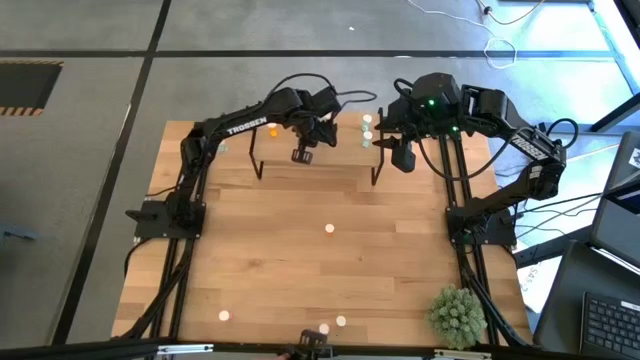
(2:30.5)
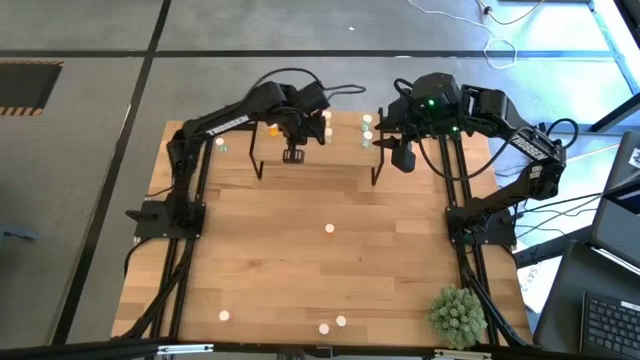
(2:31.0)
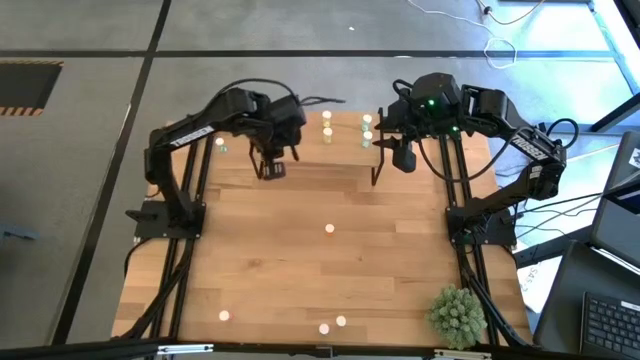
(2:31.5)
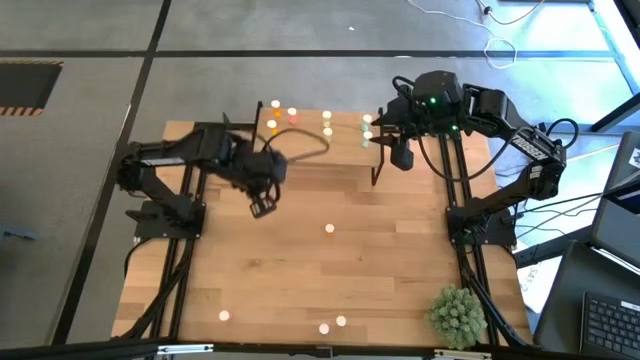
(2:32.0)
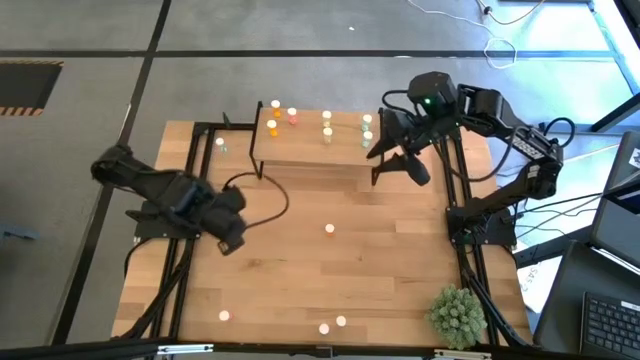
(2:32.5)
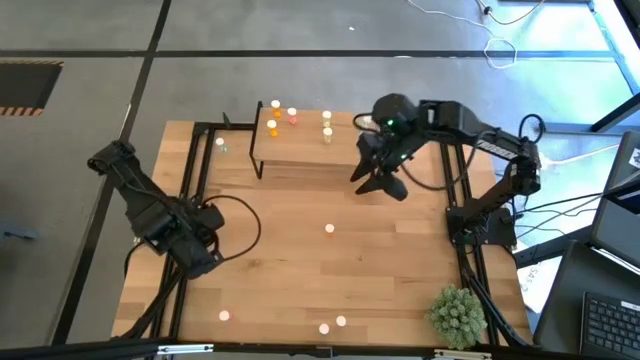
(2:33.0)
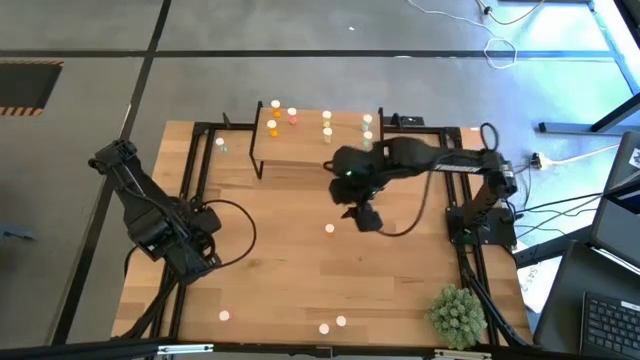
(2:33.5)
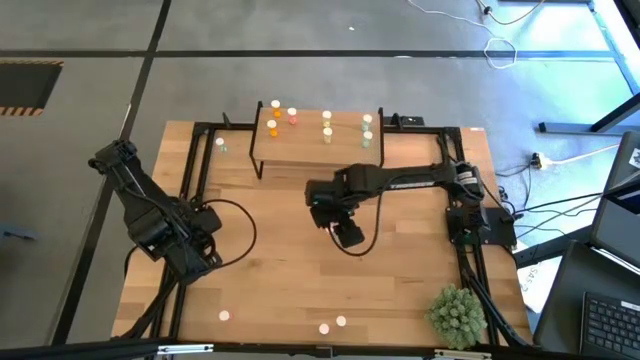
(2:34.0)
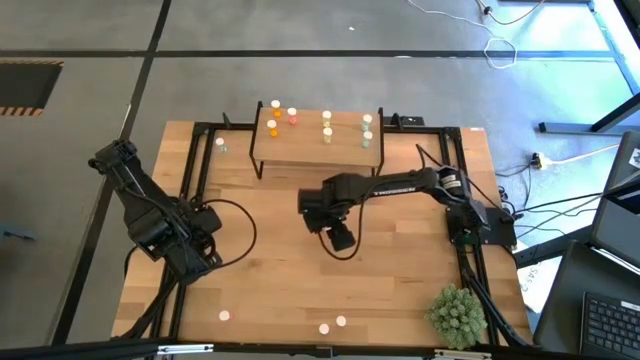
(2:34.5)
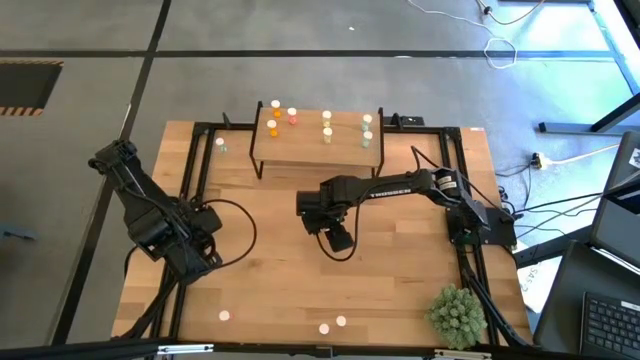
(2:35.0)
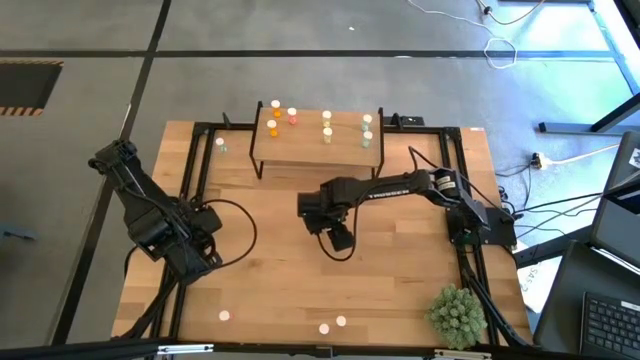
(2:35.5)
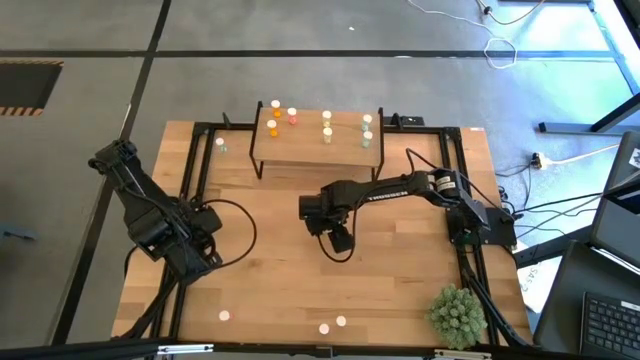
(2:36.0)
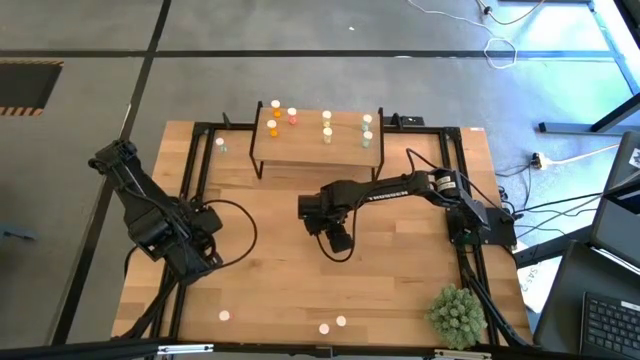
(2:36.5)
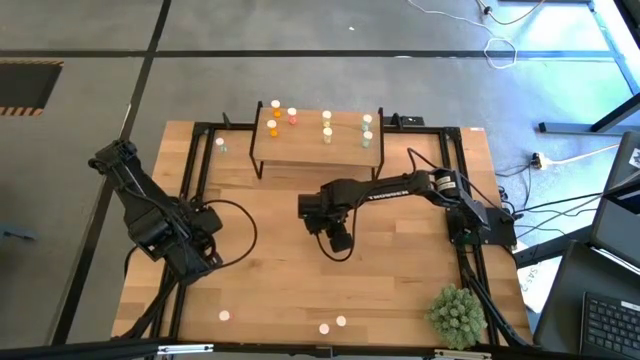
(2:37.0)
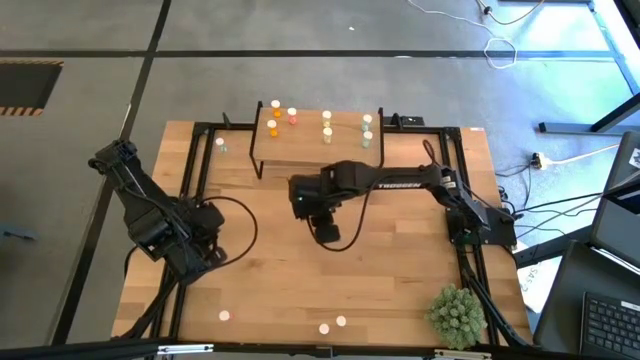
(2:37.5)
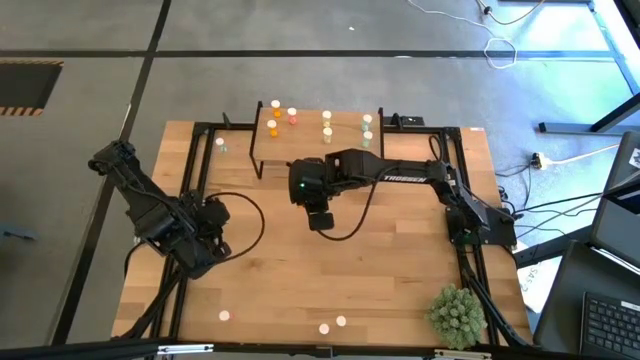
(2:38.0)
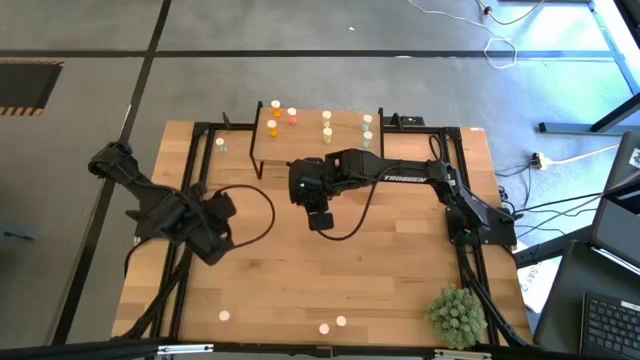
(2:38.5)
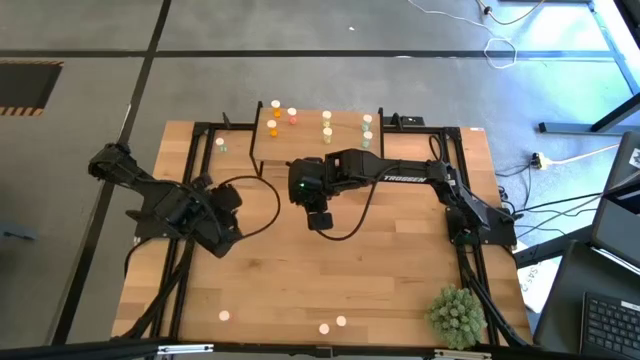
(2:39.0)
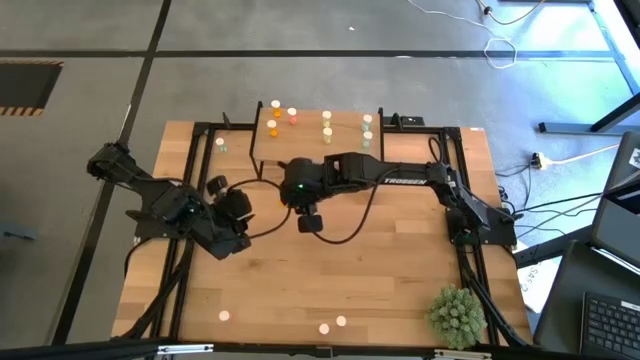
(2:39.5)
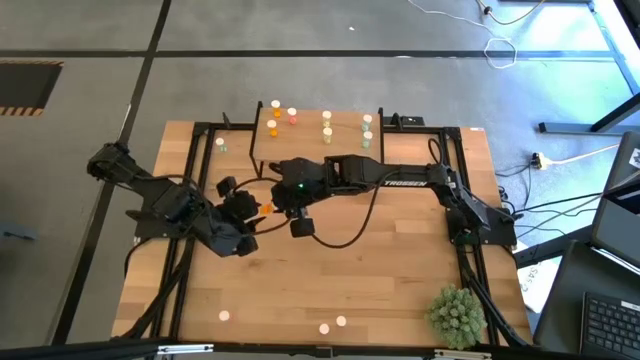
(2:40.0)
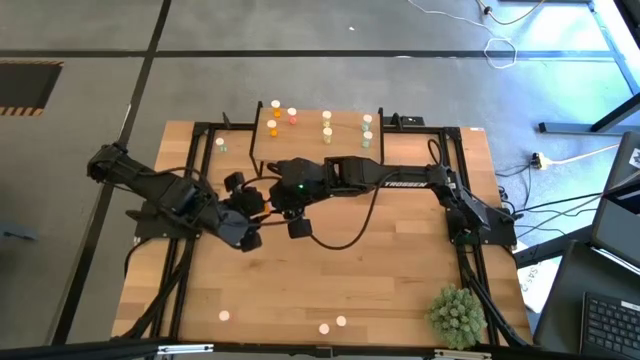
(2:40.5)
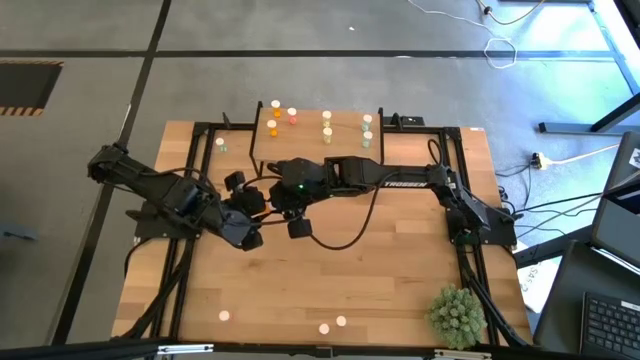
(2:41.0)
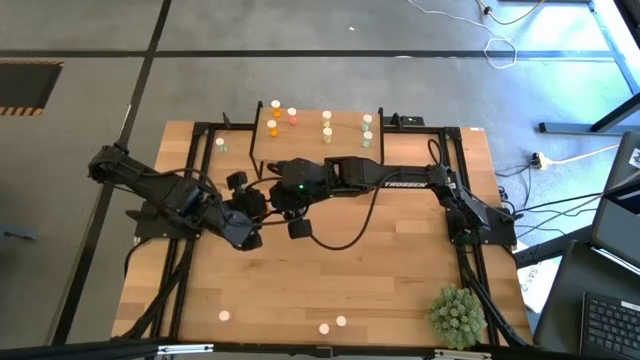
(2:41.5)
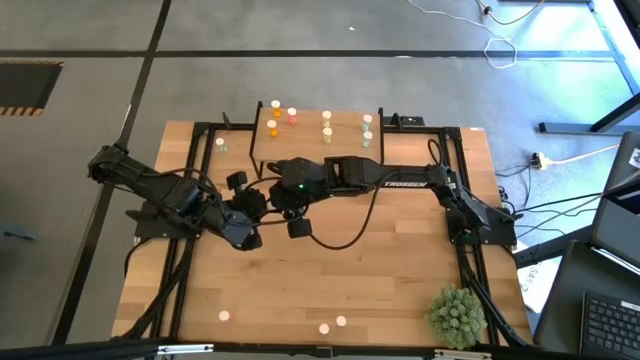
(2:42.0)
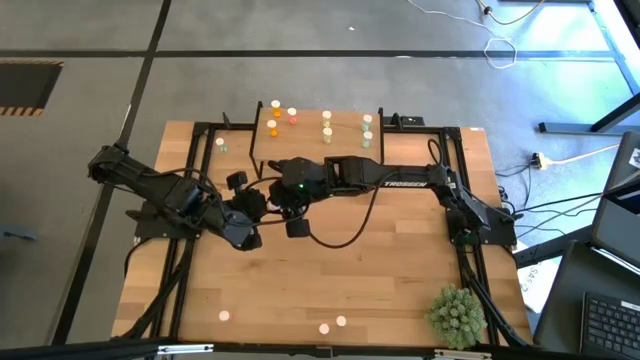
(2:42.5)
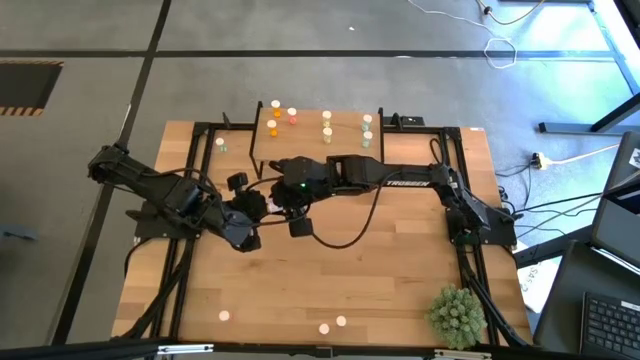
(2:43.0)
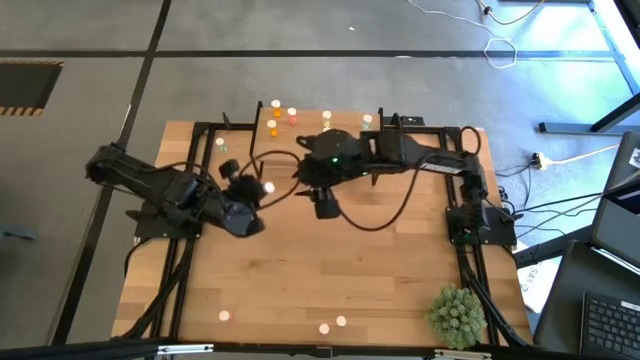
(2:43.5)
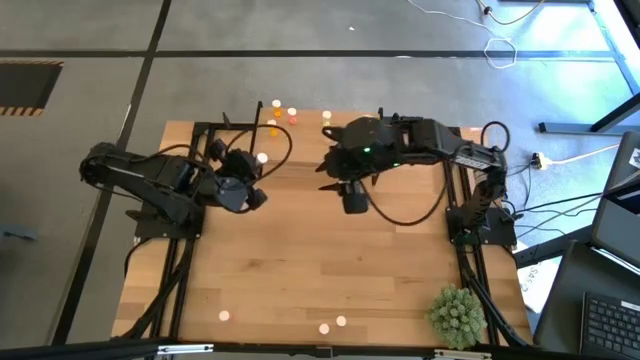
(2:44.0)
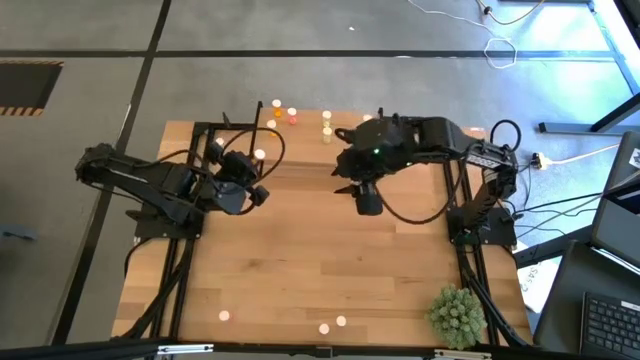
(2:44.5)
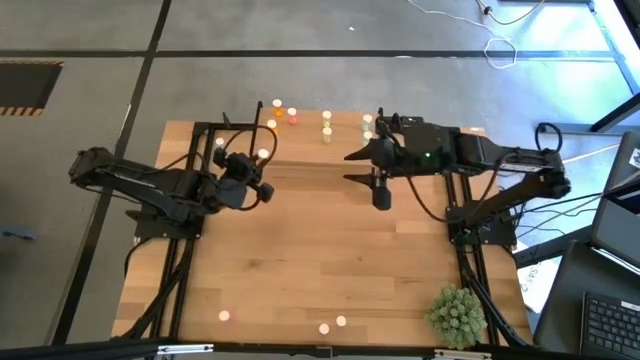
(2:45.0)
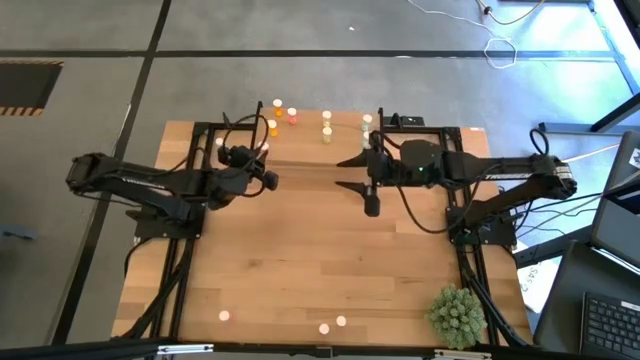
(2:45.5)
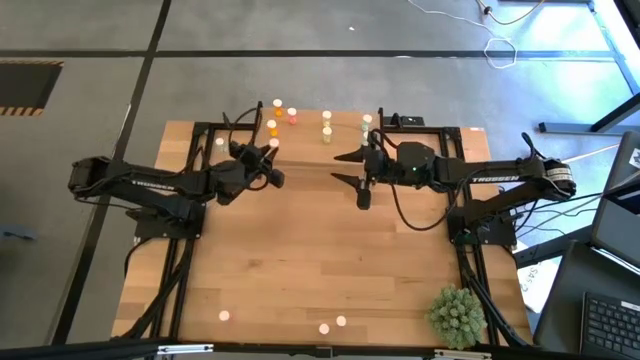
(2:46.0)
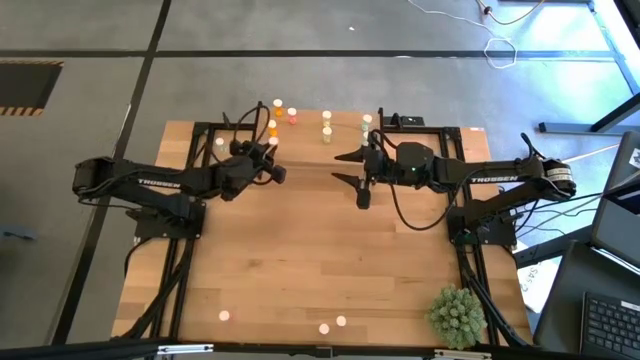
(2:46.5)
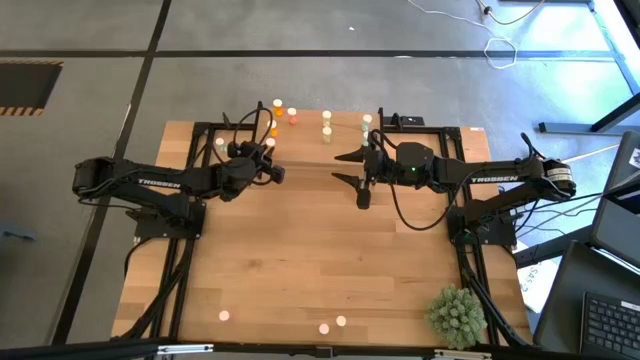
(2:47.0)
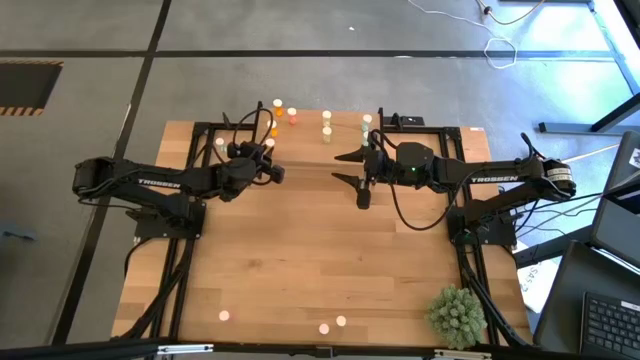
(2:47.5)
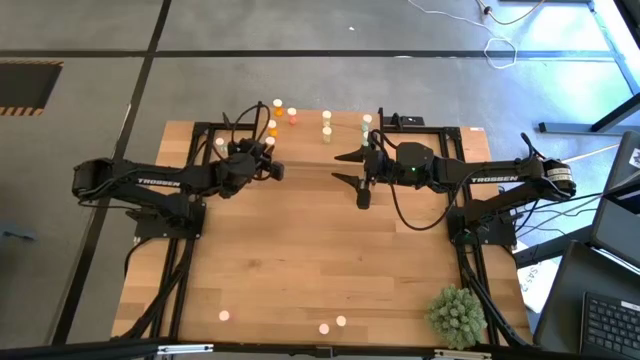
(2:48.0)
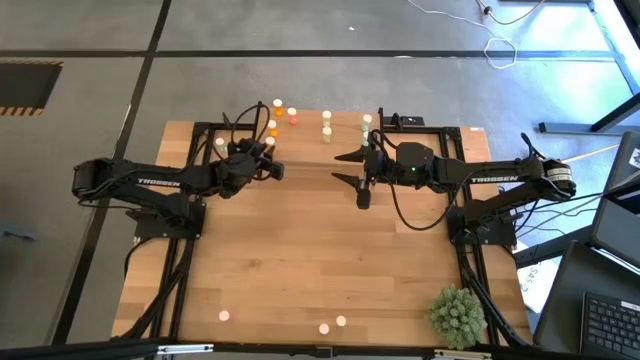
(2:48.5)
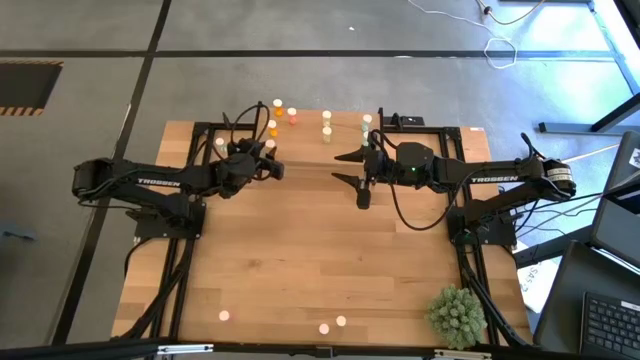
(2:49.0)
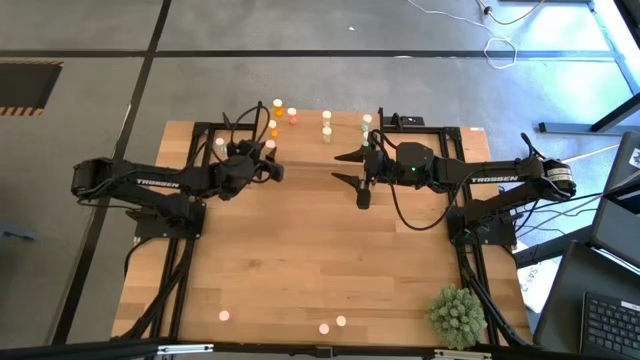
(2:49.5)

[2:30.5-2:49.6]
Task: Pick and place medicine bottles onto shelf by color
Put the orange pill bottle on the shelf aligned with the other orange pill bottles
